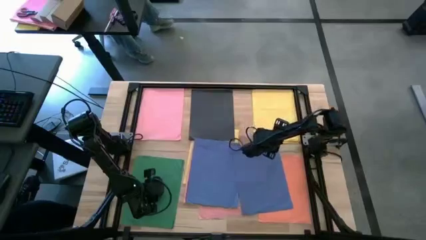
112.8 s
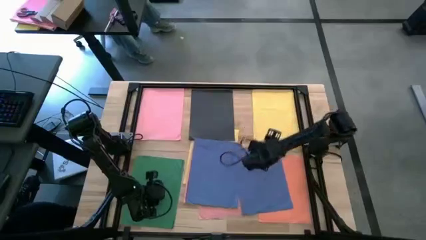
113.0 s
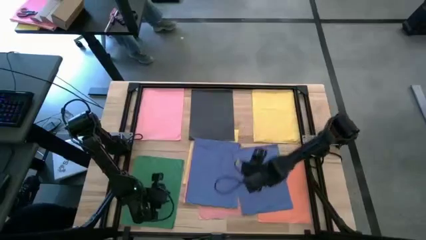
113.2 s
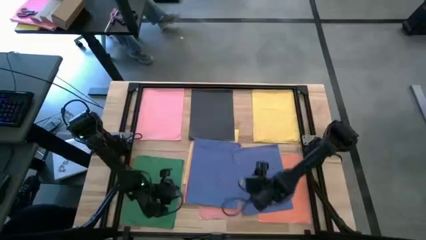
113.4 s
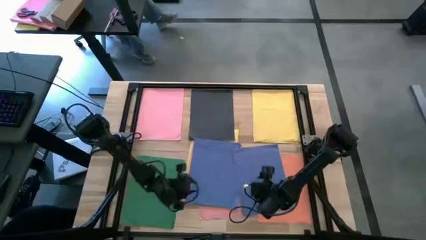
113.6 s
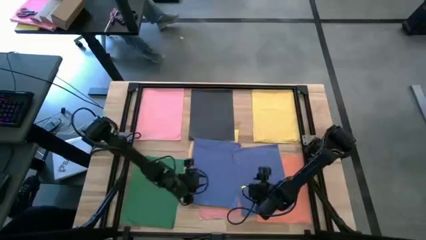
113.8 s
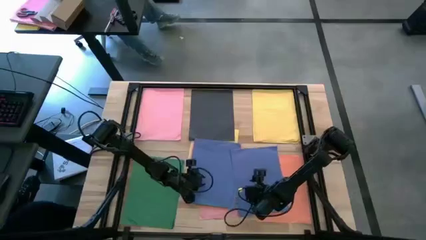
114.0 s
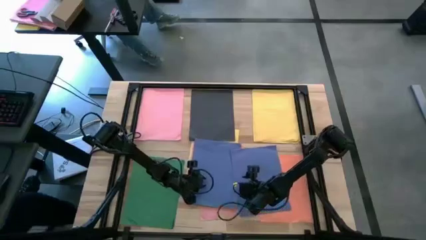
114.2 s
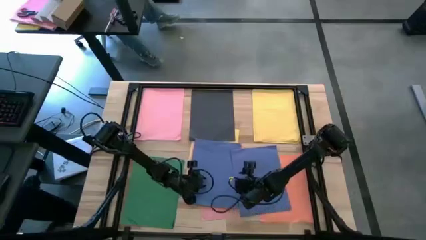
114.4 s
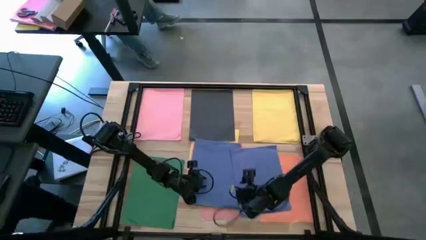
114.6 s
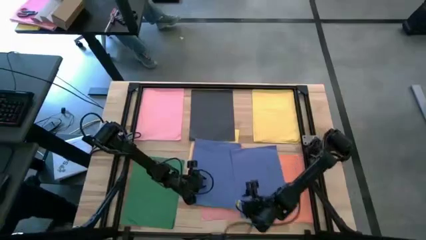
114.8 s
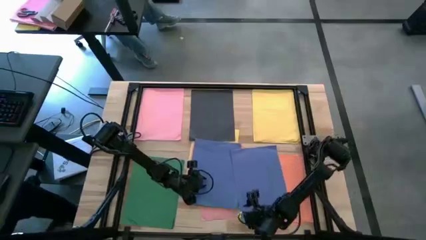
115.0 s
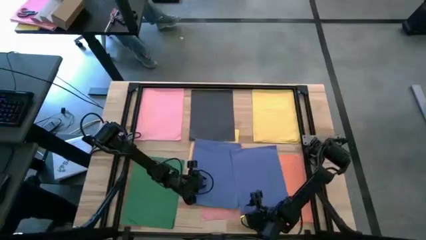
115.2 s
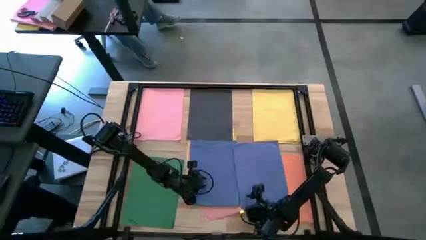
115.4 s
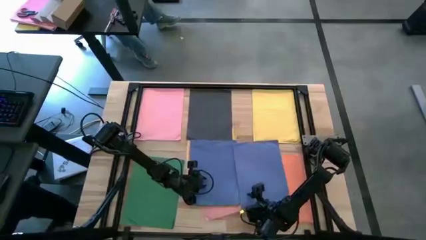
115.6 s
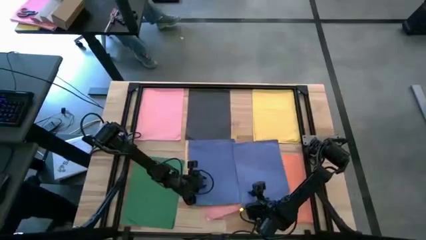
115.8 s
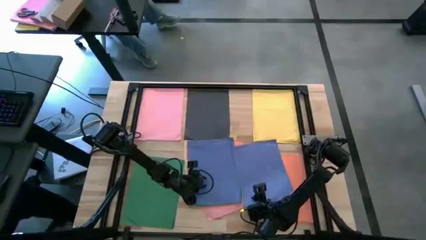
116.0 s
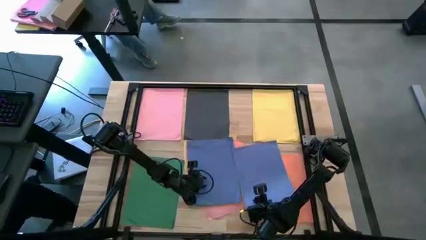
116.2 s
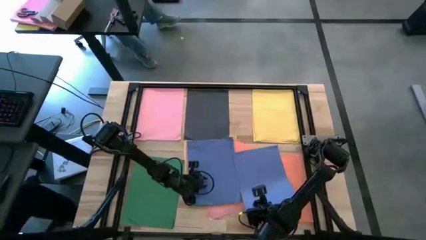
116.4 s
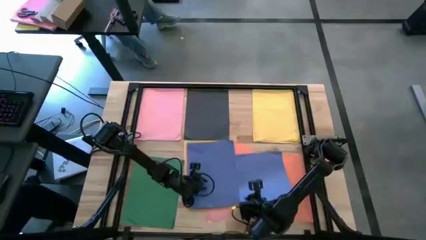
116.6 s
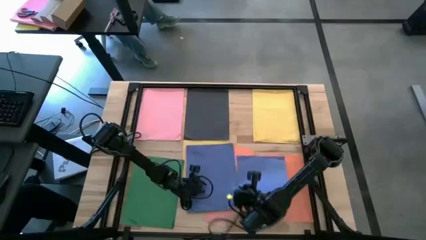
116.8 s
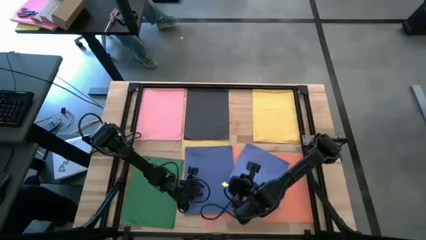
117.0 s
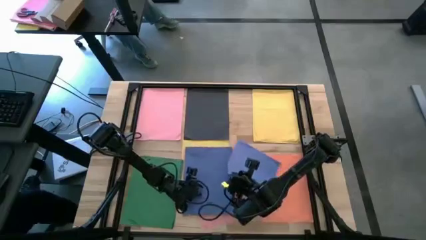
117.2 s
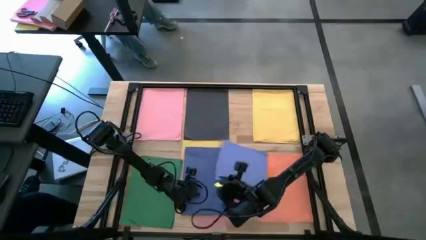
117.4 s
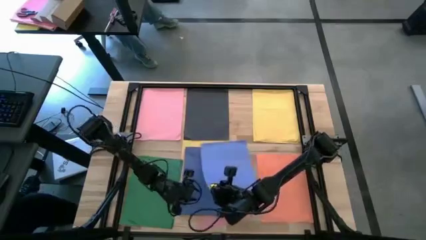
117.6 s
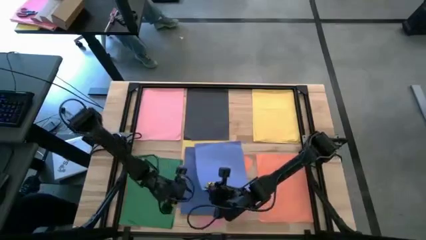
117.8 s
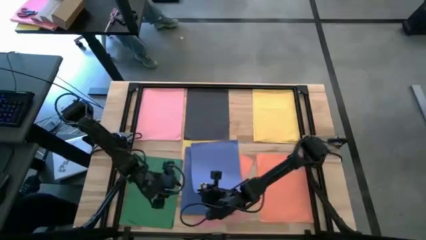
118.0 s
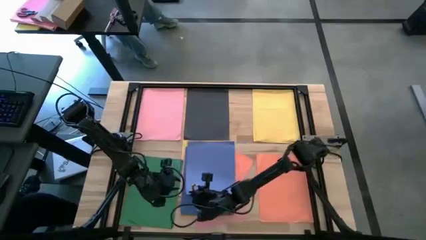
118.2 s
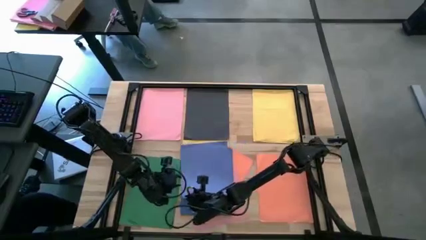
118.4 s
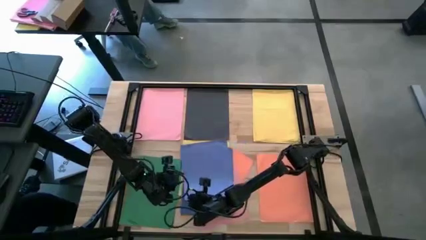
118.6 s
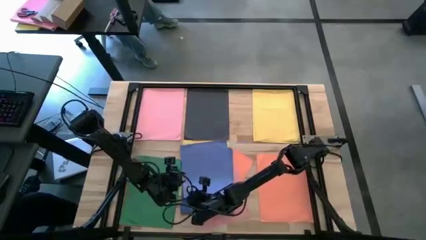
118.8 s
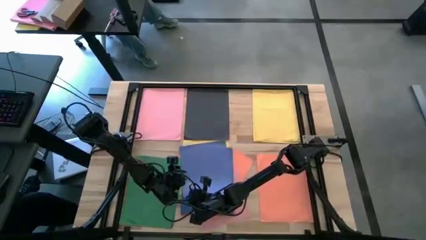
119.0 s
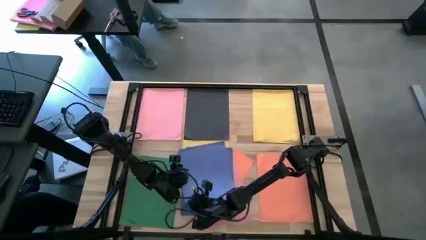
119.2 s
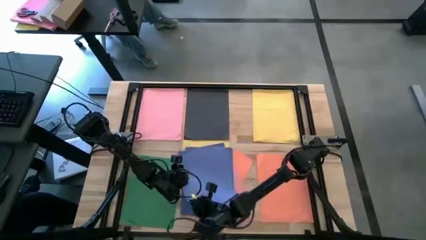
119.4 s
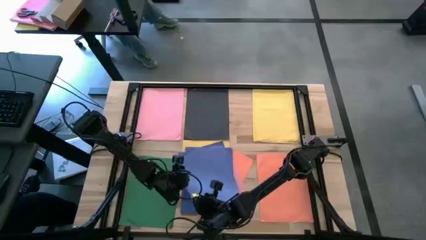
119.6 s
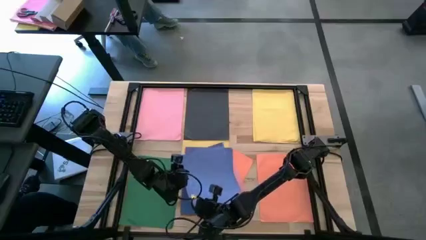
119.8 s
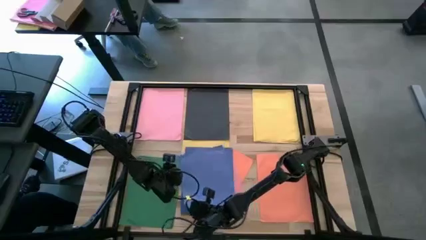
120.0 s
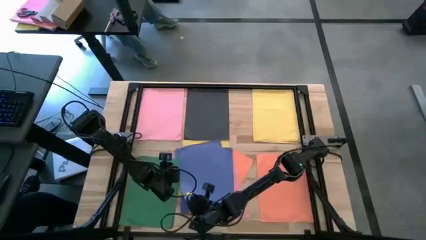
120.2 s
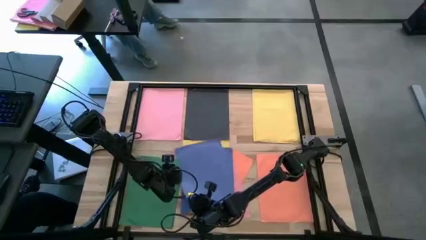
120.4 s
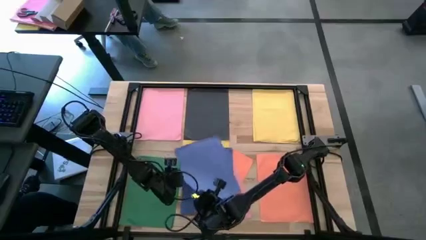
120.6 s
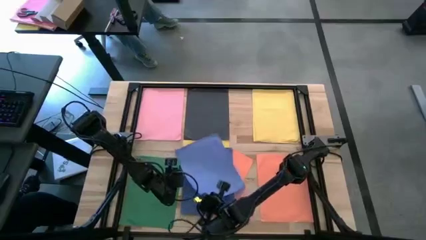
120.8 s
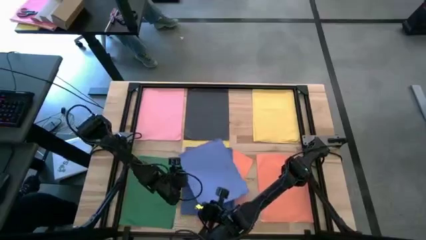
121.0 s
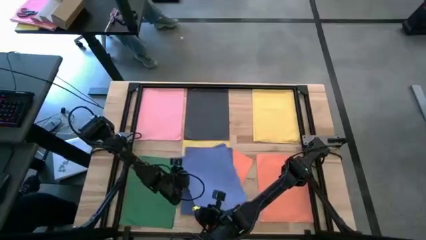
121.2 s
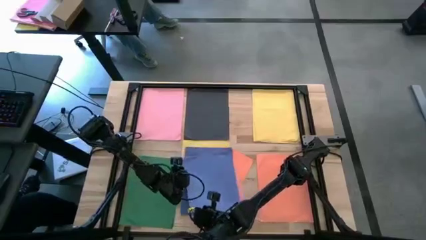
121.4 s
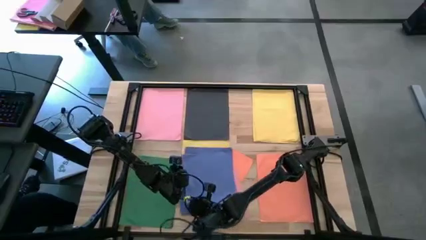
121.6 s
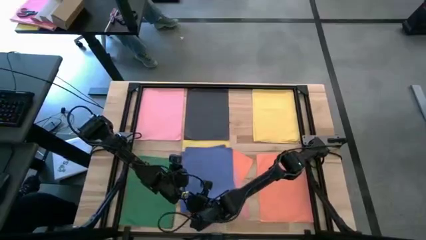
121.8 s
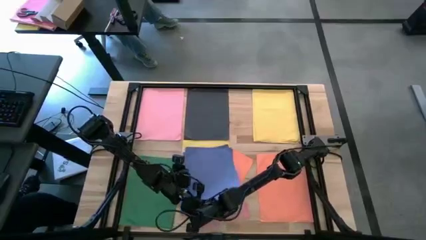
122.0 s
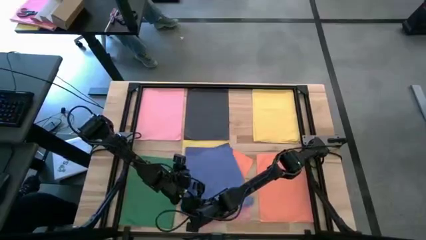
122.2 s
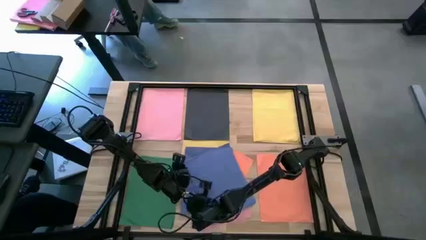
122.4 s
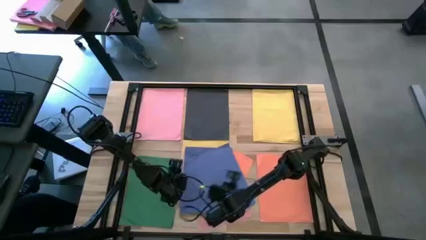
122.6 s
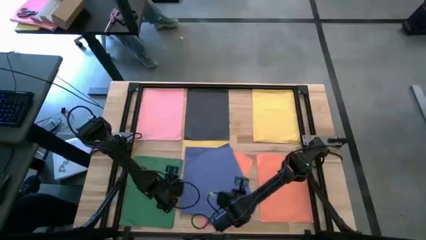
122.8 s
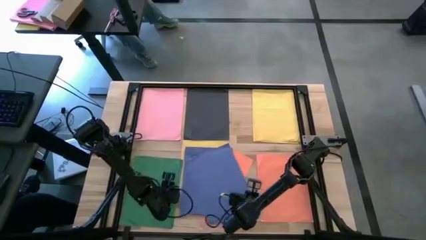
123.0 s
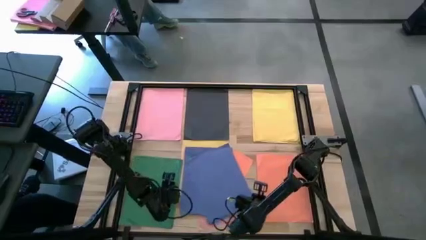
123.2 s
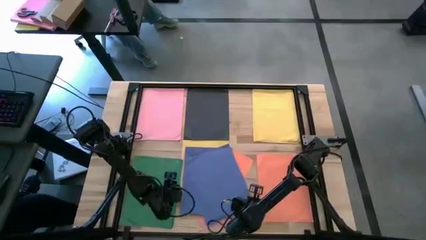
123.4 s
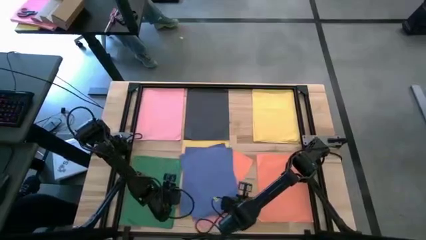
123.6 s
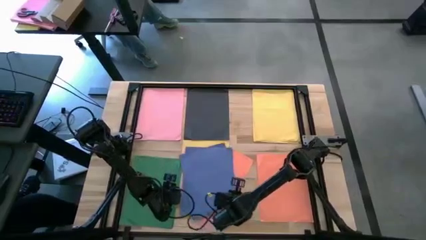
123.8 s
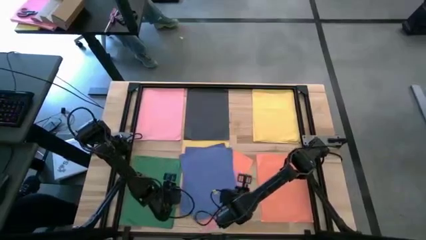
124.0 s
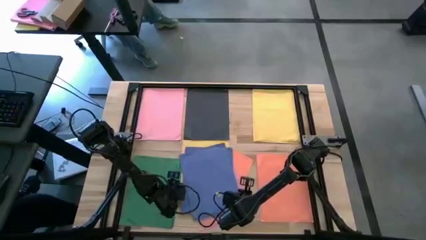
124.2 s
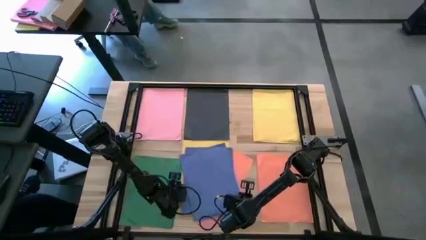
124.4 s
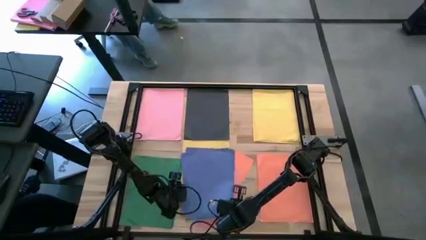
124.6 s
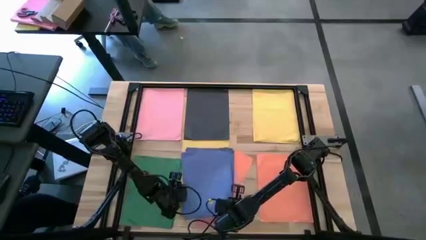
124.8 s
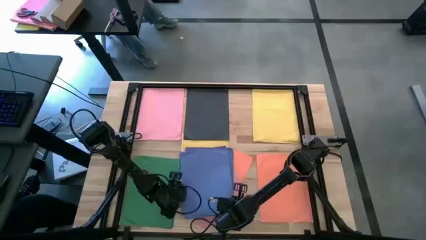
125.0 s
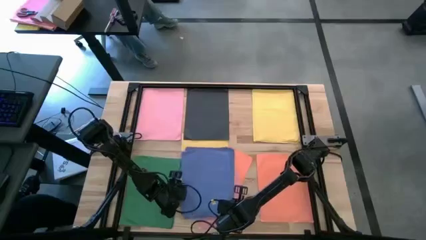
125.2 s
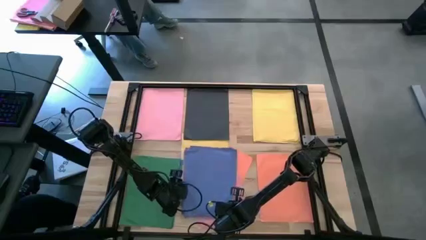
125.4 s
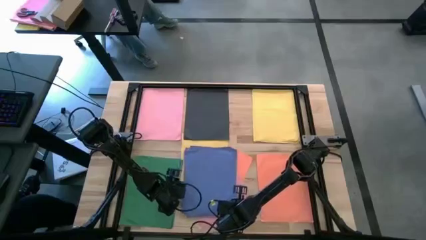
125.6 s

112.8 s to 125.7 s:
Task: Organize paper
Stack the purple color paper on top of the other purple color paper
